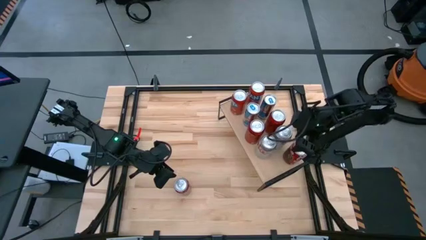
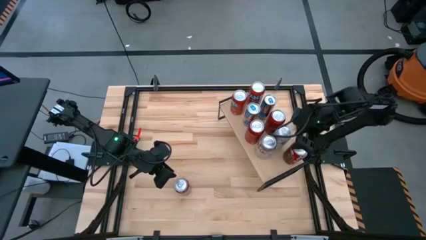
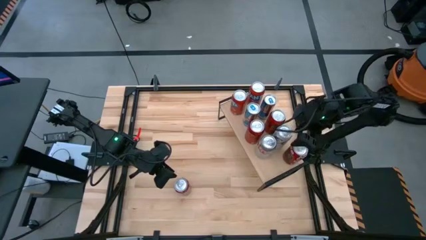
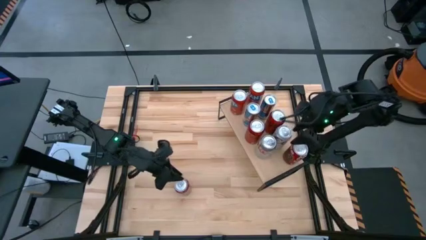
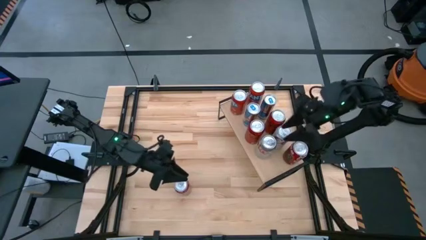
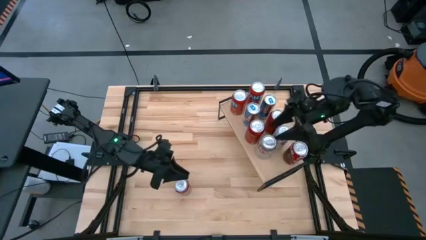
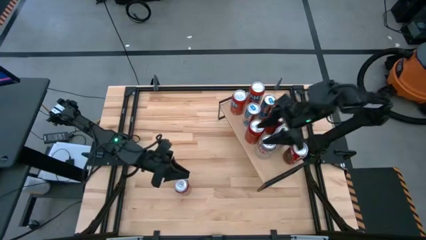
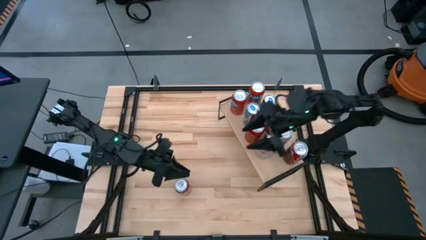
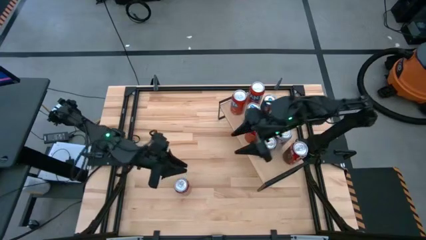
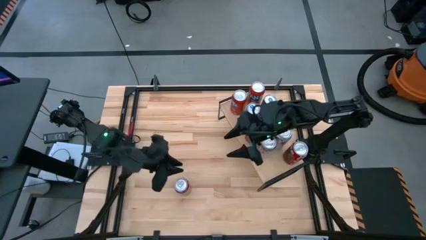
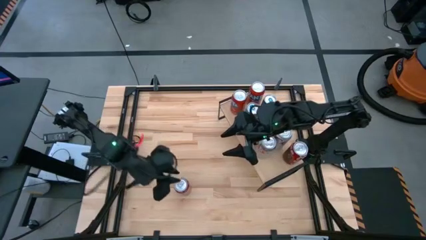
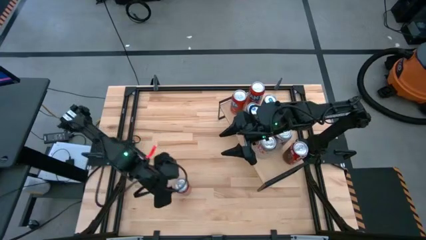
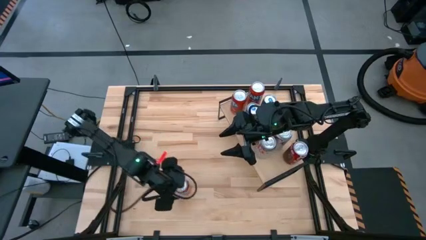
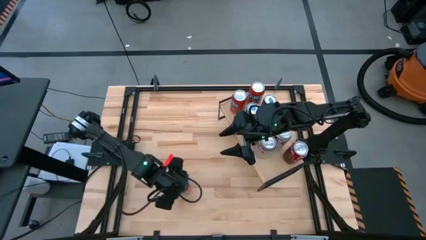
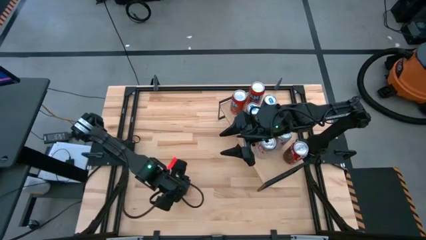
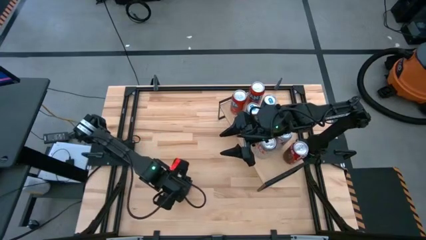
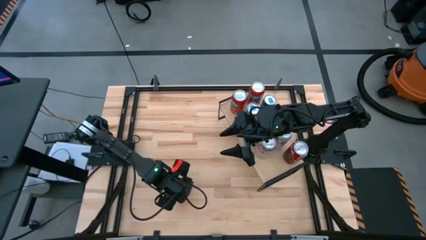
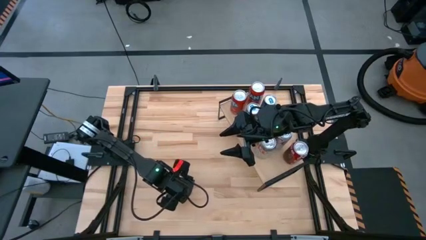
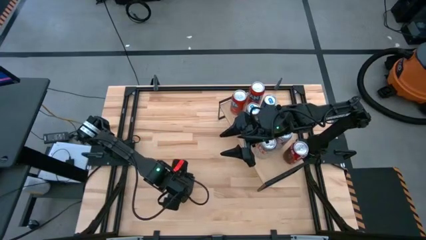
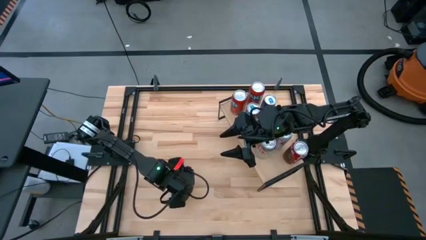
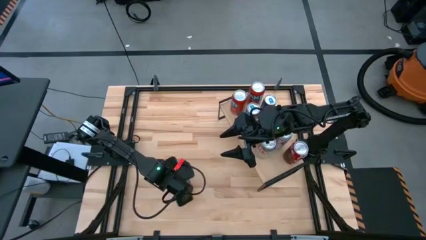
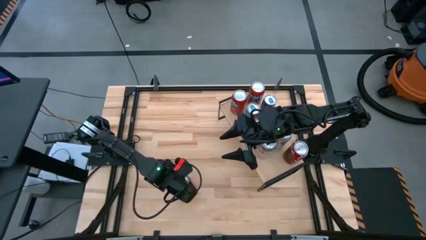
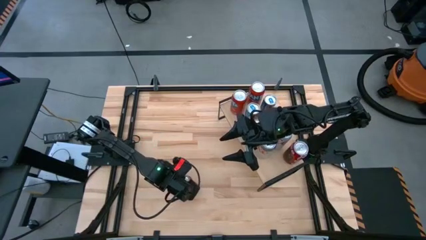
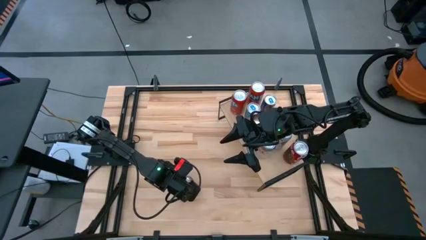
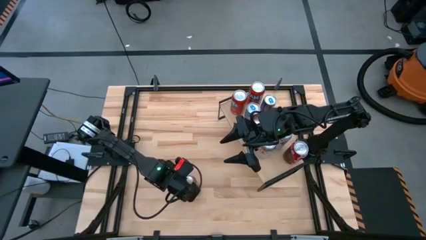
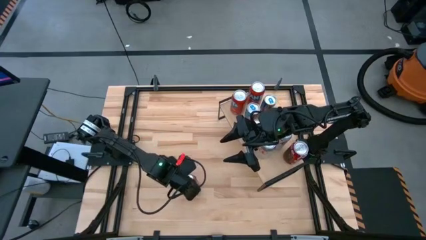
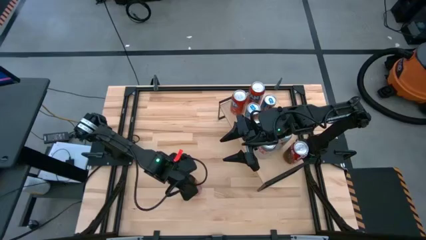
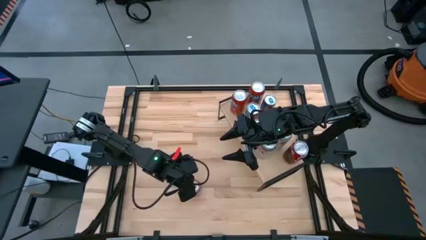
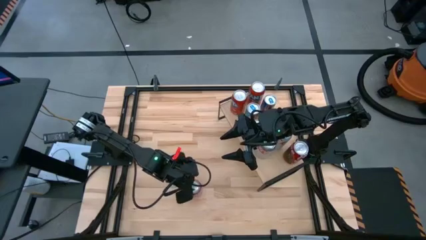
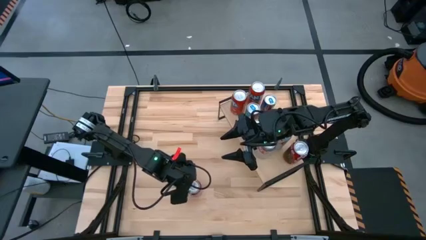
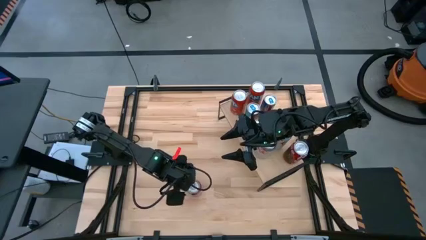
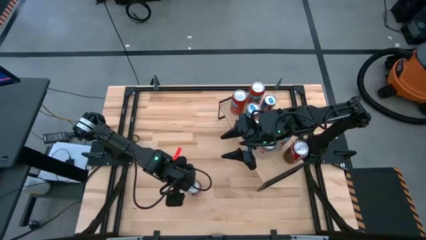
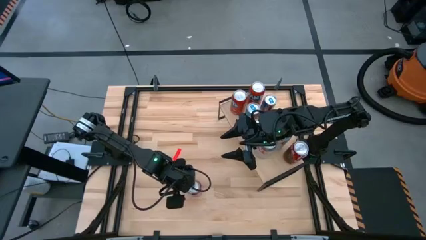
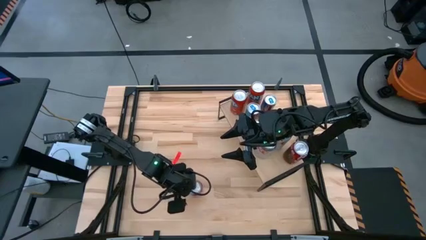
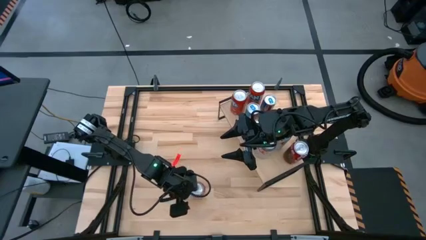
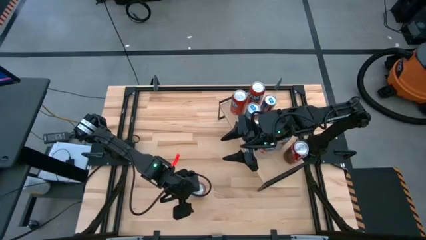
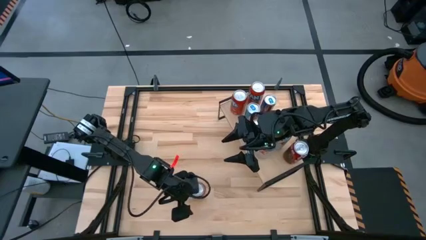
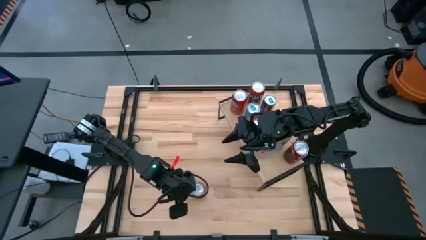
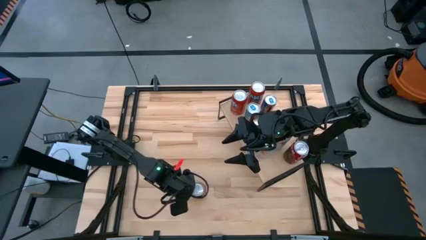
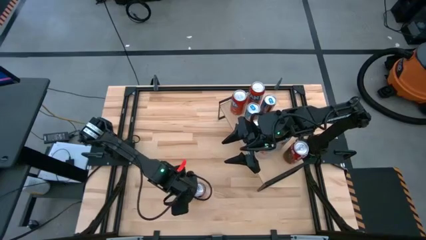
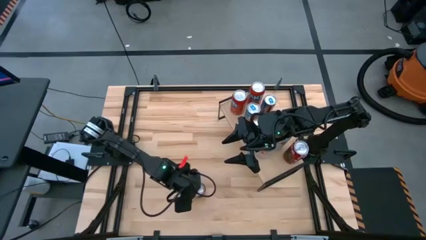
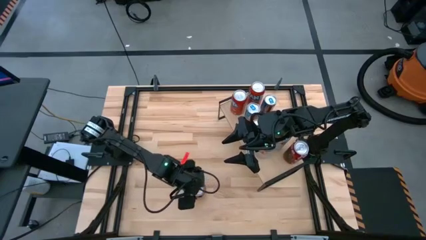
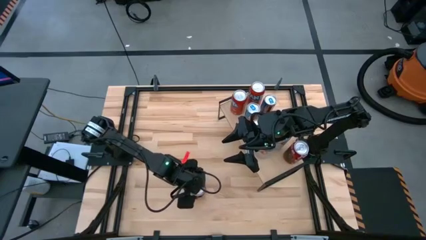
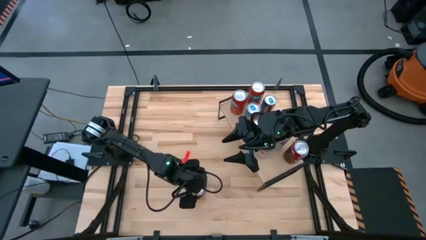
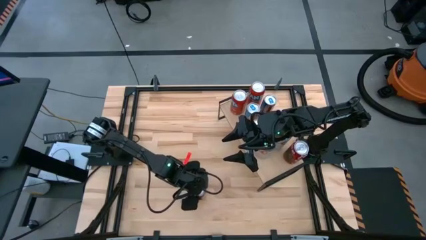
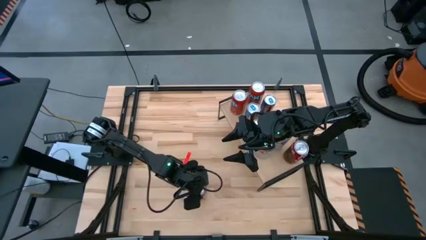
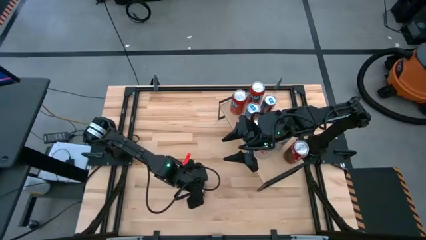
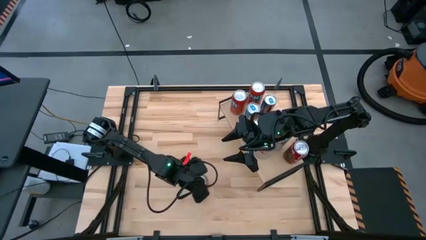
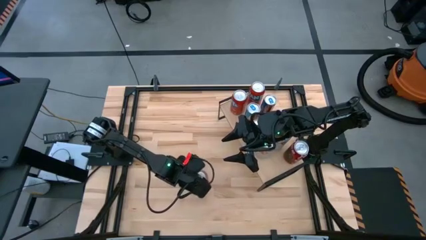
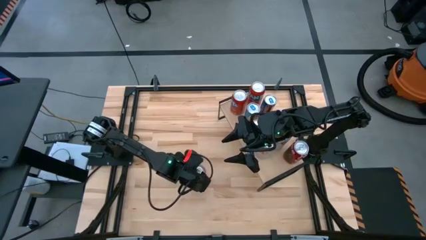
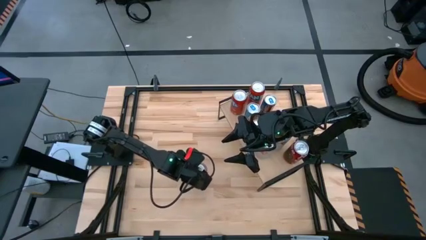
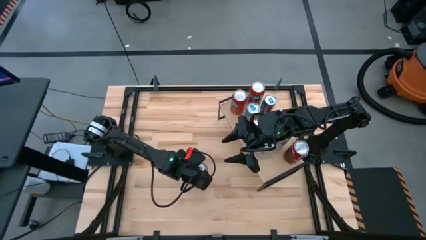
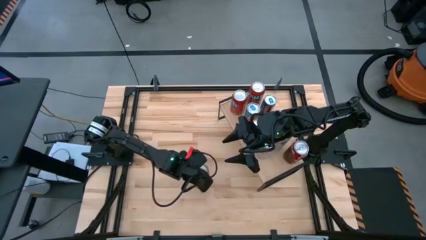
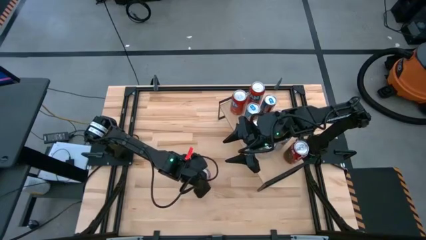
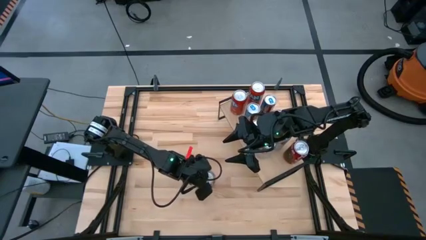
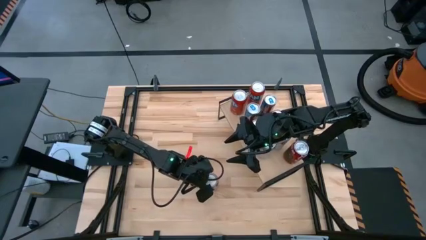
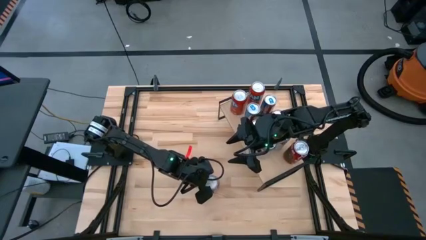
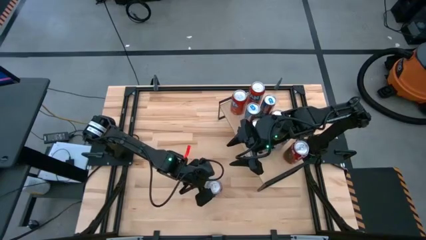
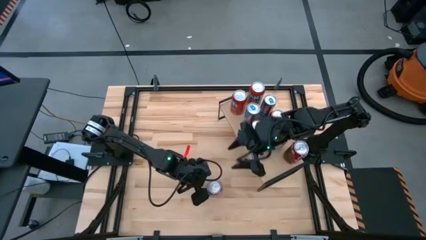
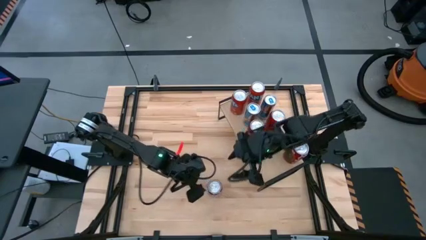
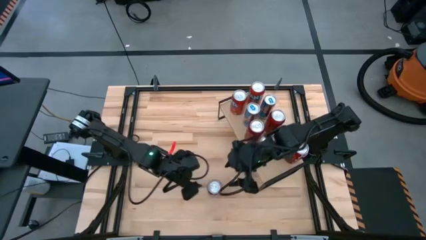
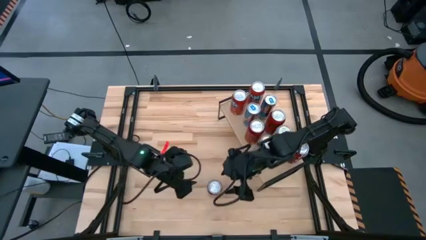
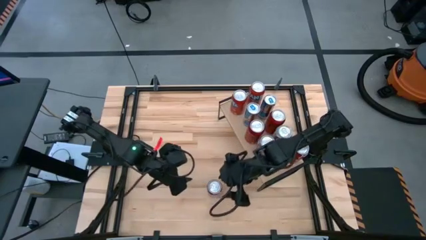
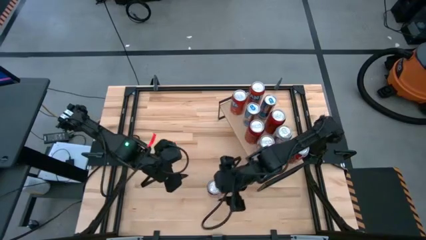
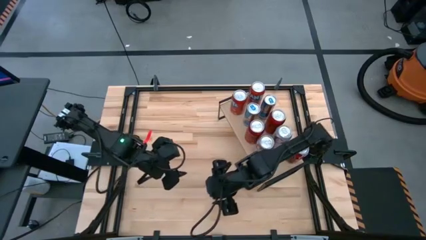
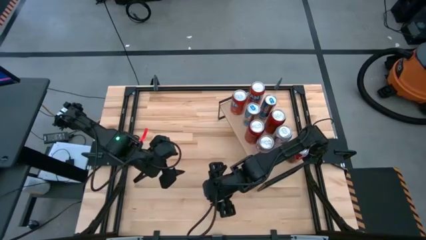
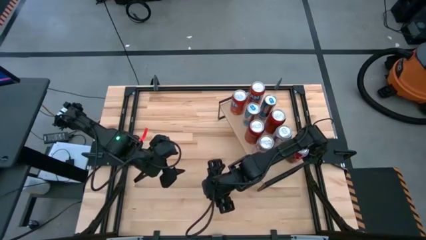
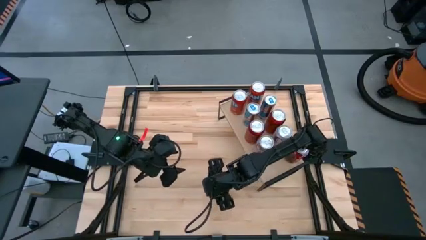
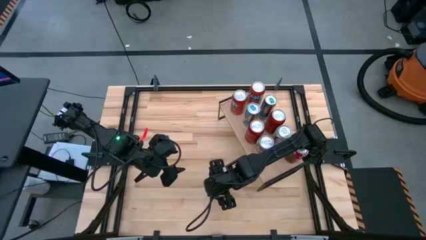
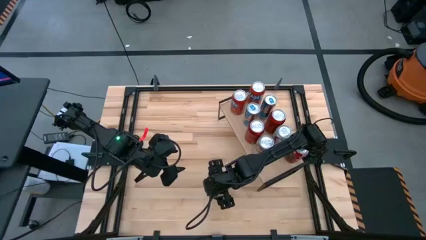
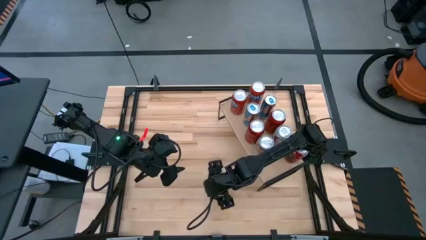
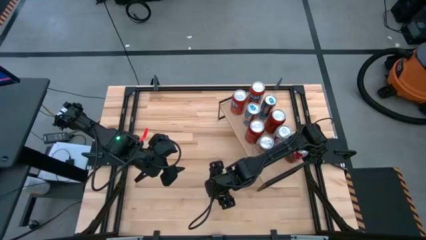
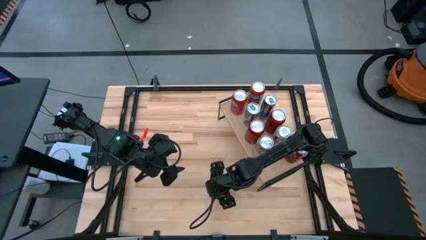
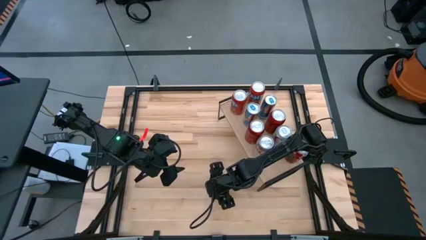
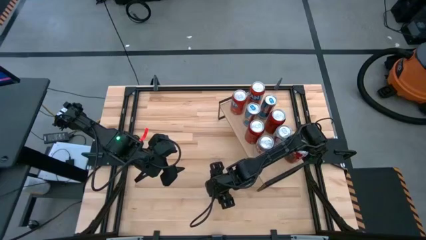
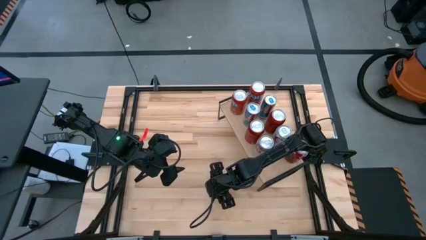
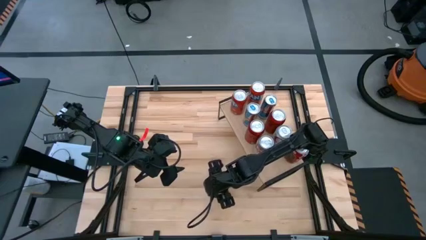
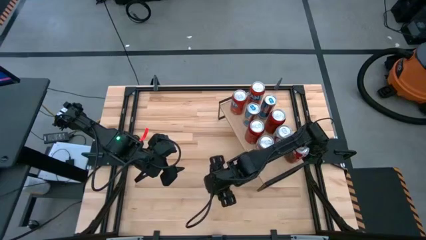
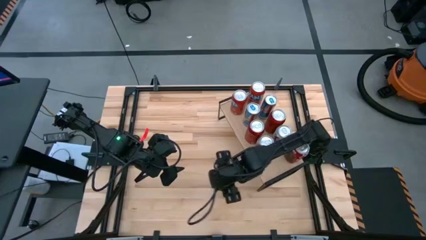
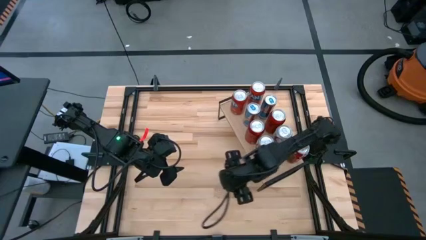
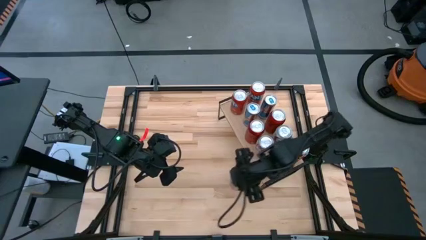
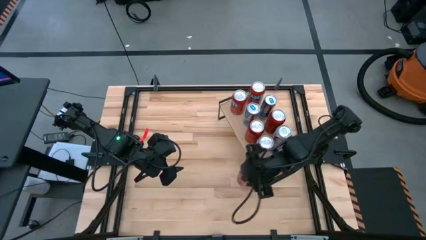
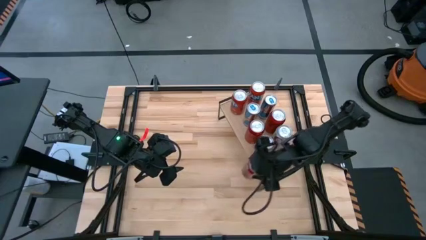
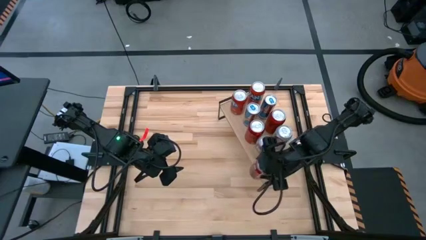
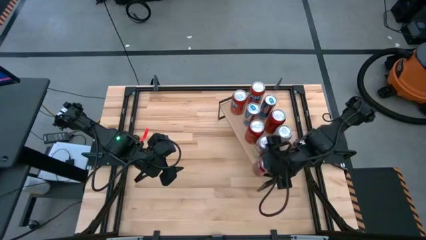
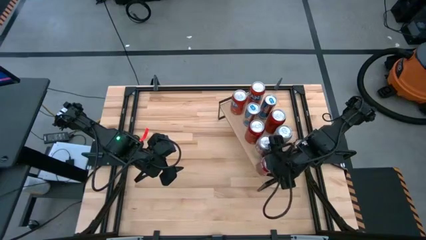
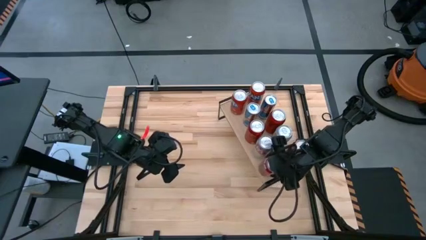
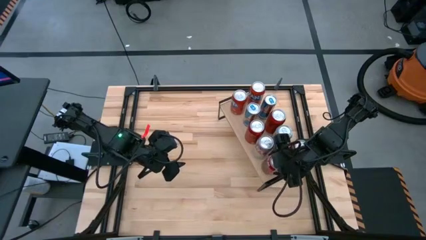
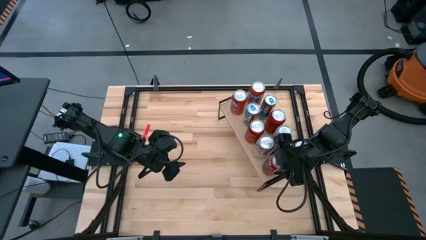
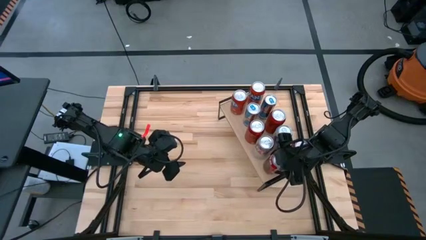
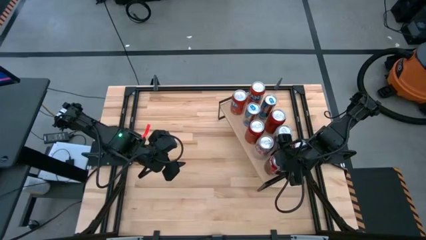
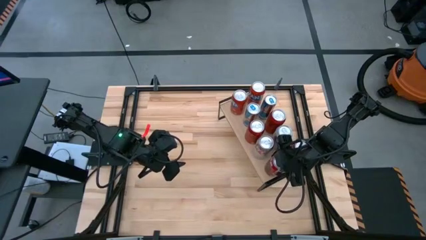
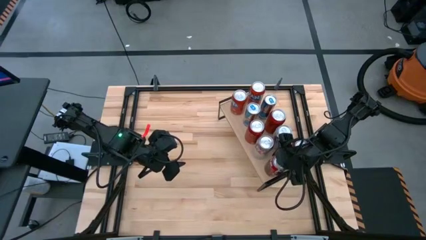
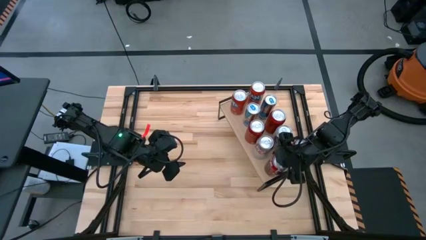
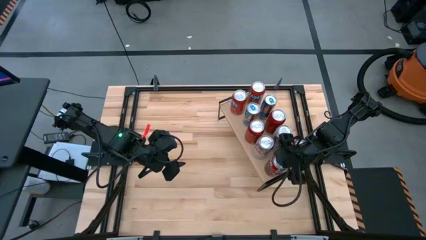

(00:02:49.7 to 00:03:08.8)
Task: Place canned beverage on shelf
Put the red soda can aligned with the other red soda can on the shelf
